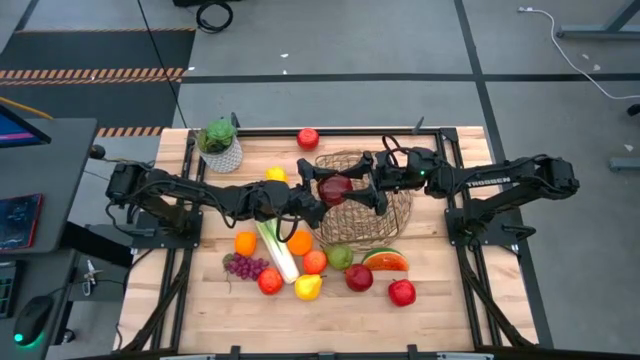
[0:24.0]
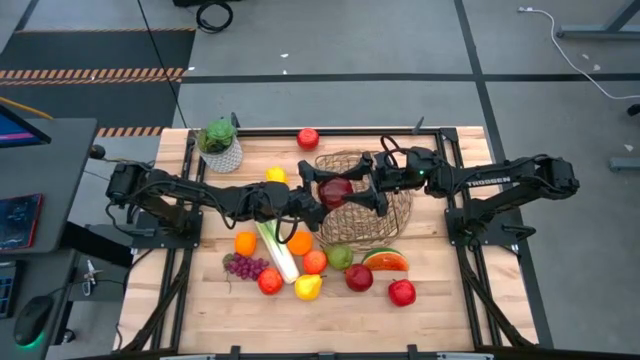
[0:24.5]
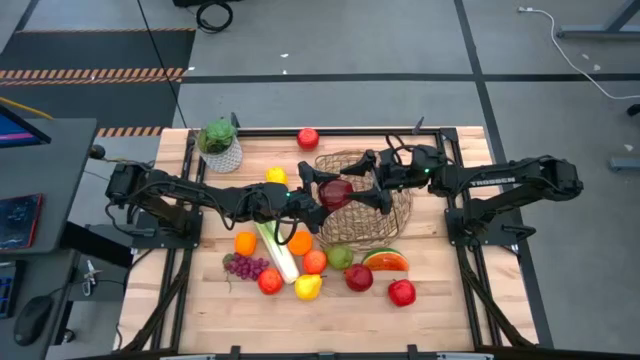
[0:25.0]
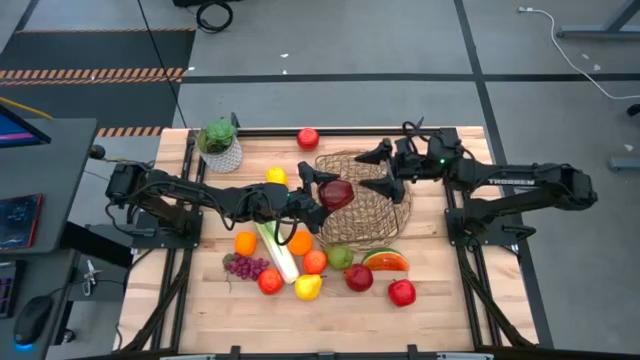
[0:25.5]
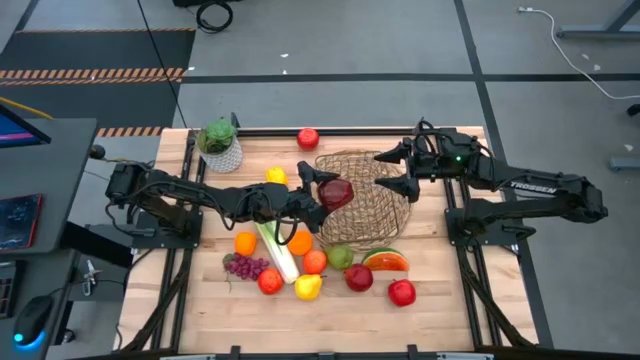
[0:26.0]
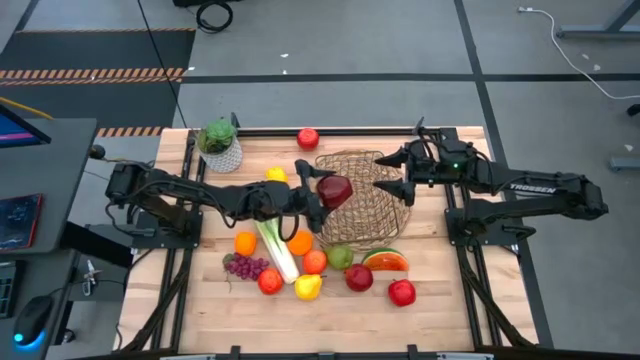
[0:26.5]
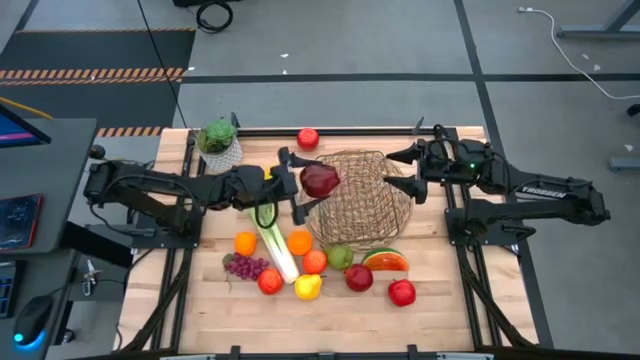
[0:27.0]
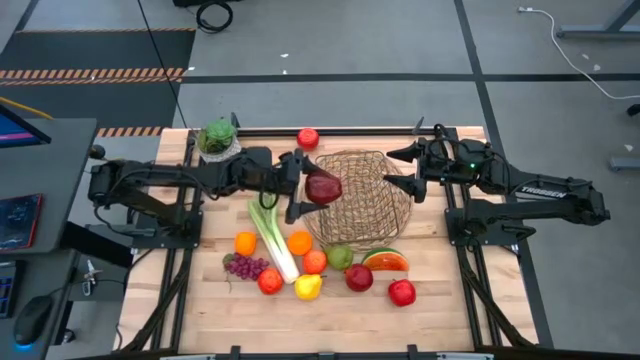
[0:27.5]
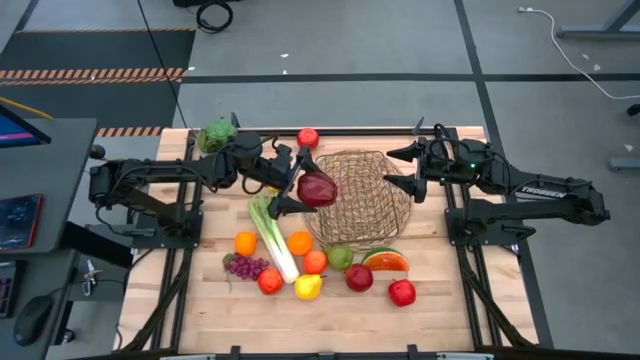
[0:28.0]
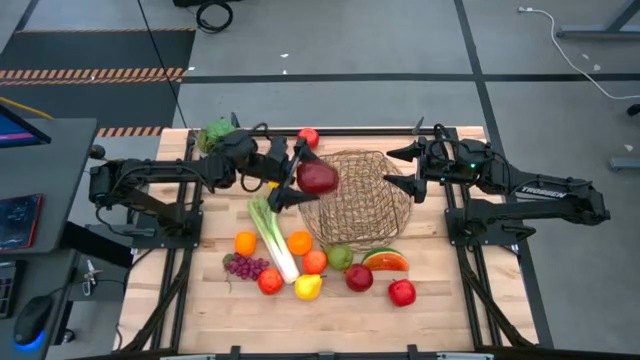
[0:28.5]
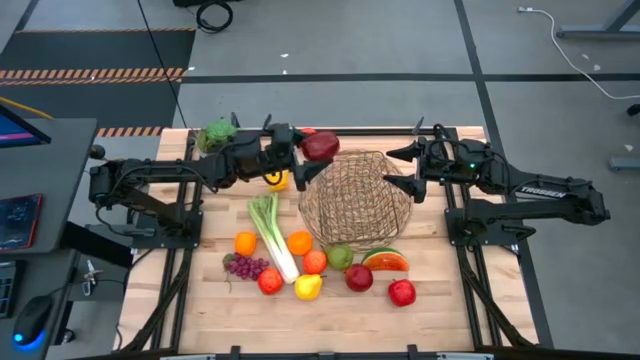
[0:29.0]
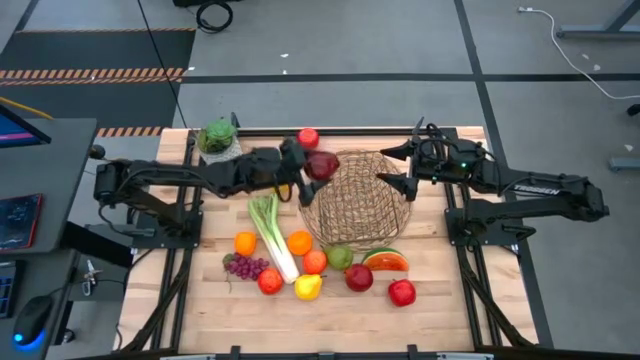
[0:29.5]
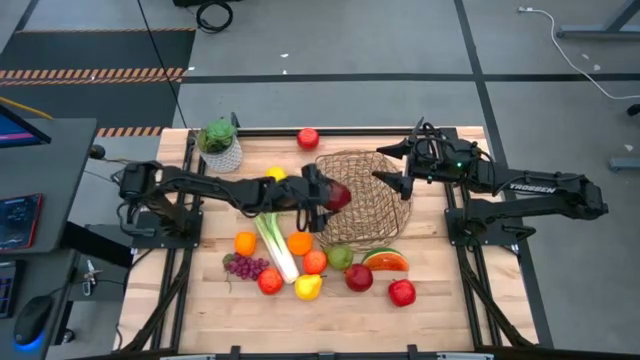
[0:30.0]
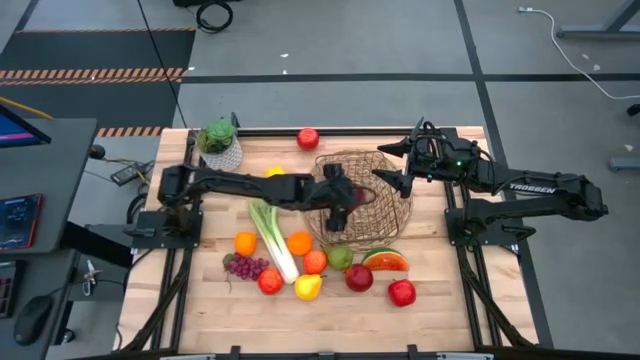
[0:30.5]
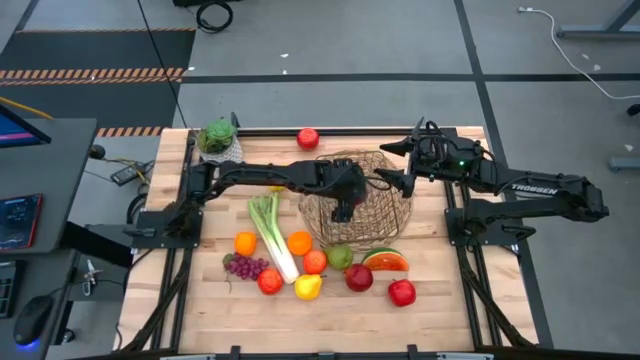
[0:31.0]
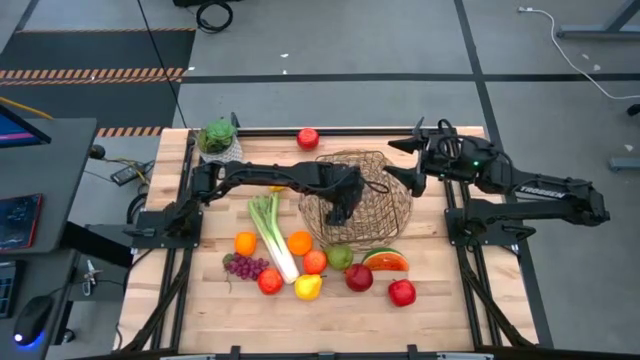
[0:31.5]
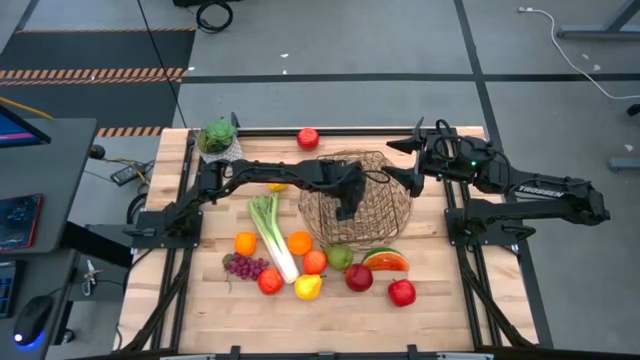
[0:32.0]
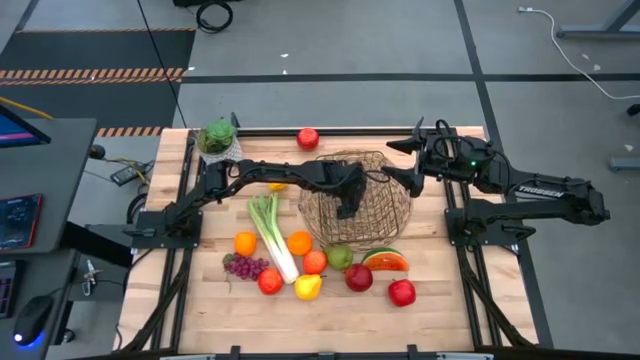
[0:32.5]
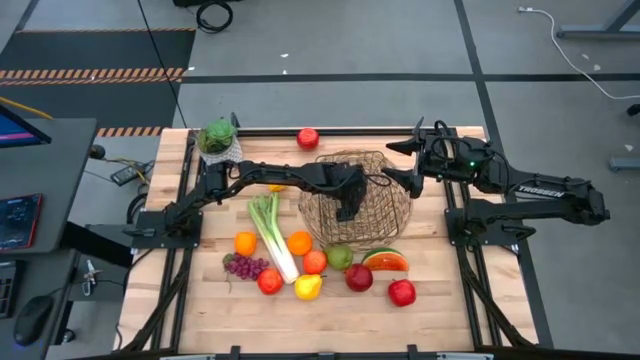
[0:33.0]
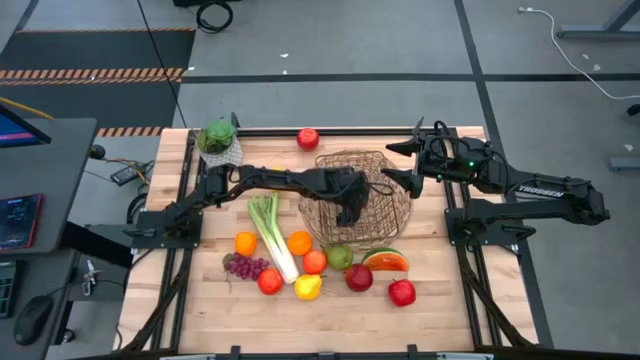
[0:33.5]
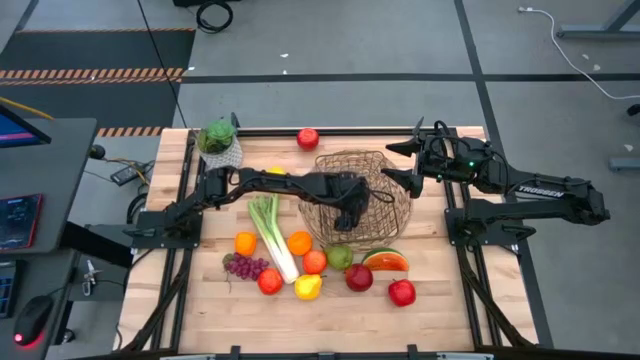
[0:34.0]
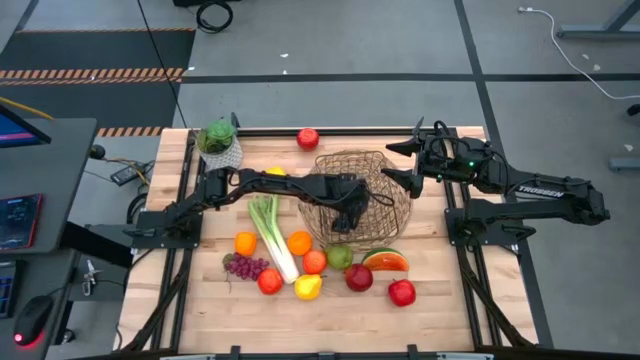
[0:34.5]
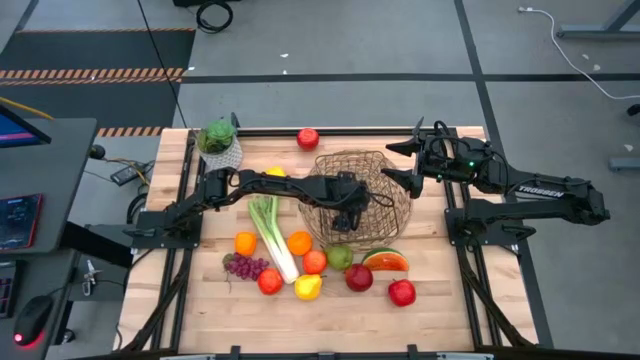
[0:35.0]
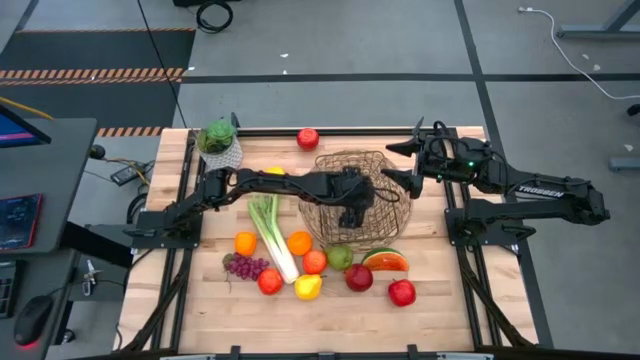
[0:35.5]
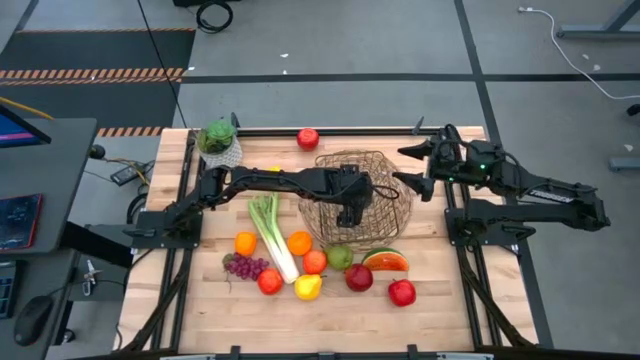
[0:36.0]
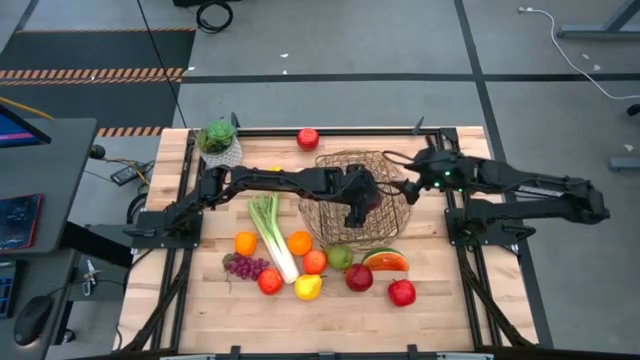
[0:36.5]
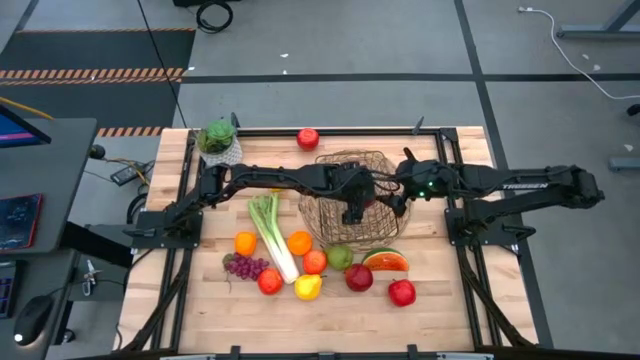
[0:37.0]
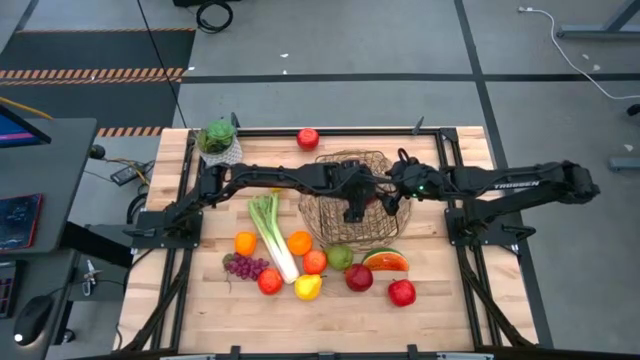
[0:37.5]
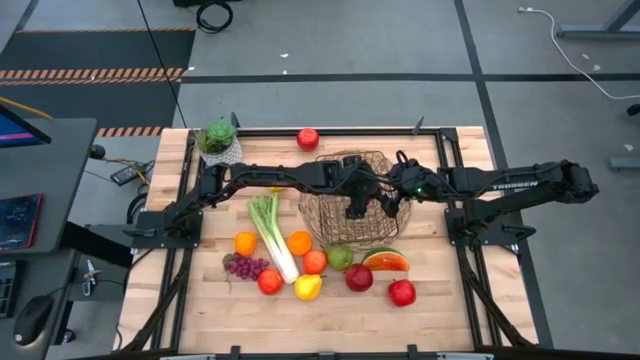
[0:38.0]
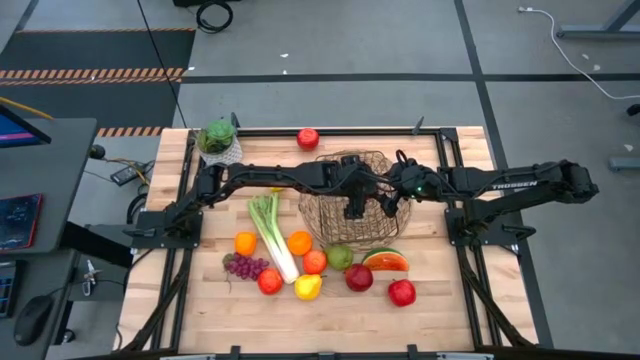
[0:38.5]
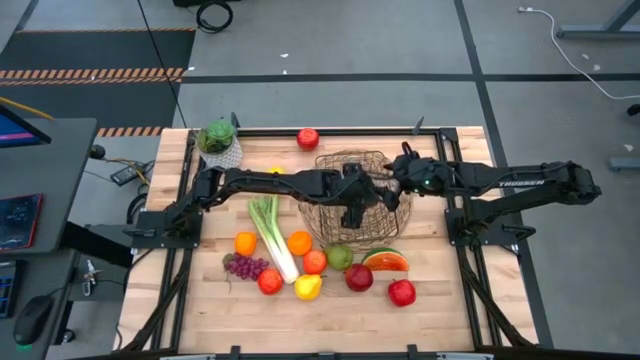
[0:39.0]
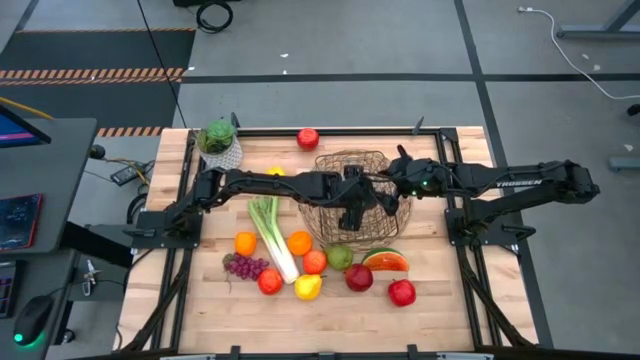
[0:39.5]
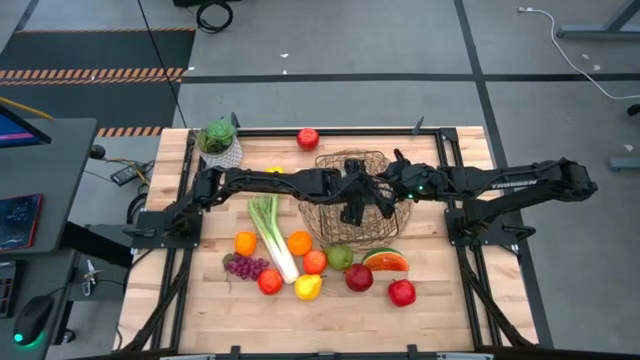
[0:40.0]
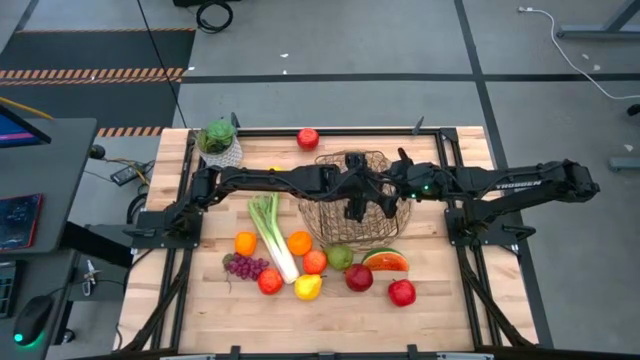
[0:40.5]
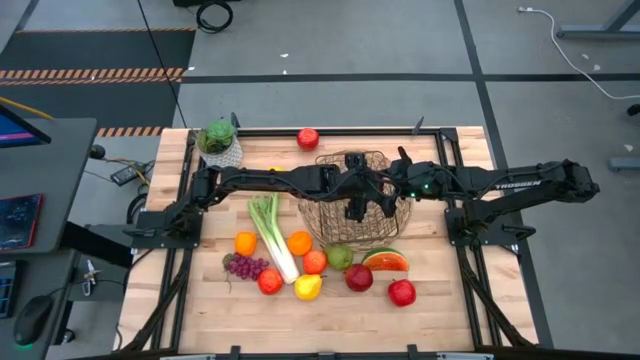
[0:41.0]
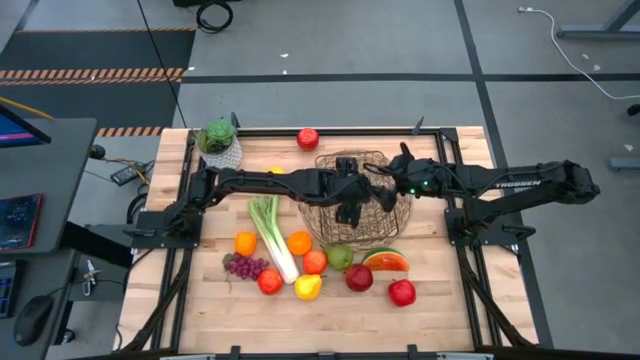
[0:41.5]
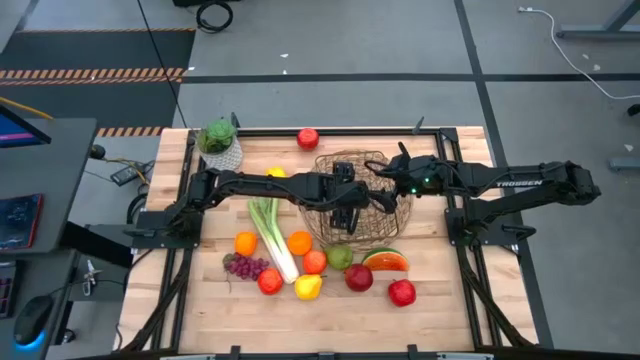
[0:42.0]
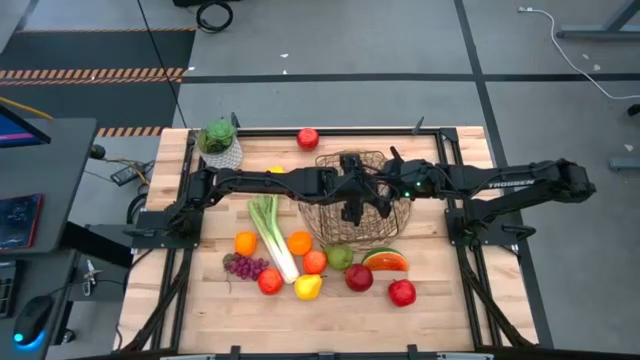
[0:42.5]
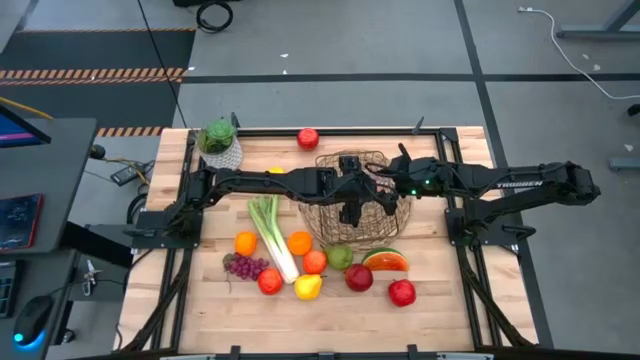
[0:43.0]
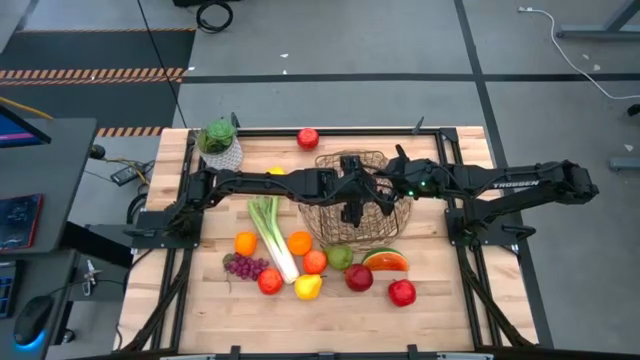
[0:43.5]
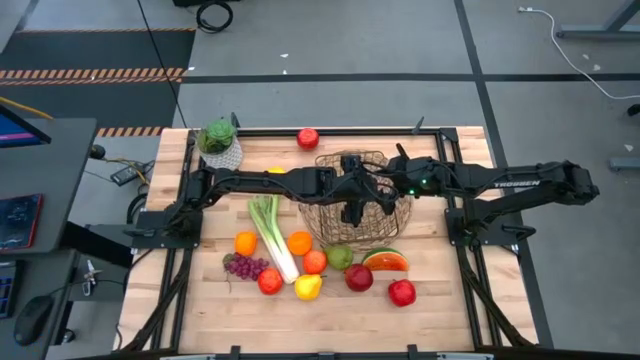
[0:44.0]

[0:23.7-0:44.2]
Task: Build produce basket
Put the dark red apple into the brown wire basket
